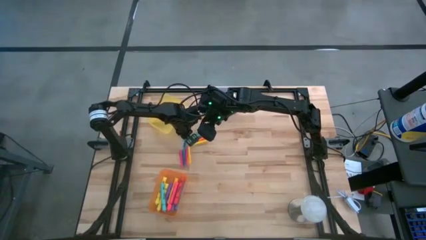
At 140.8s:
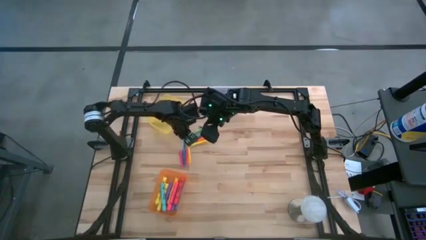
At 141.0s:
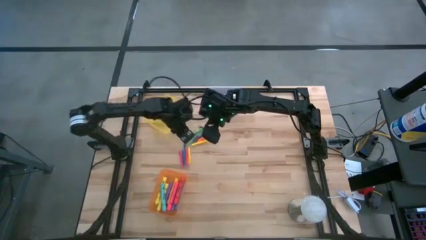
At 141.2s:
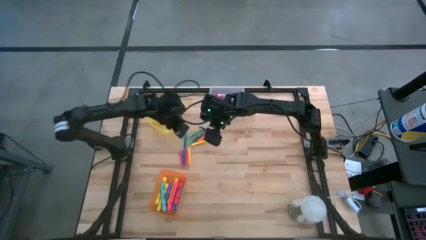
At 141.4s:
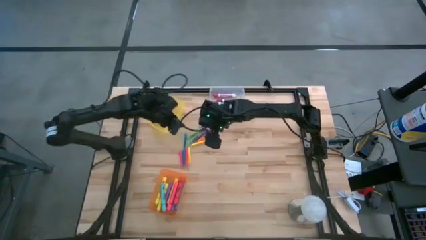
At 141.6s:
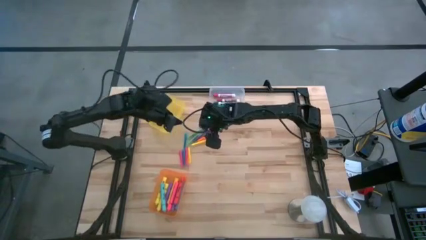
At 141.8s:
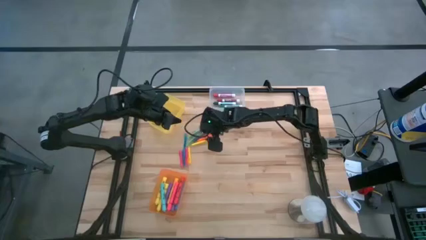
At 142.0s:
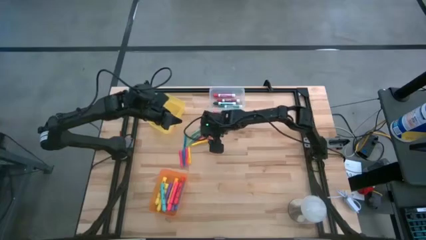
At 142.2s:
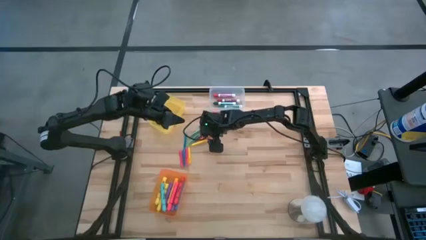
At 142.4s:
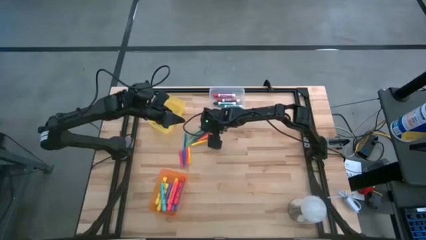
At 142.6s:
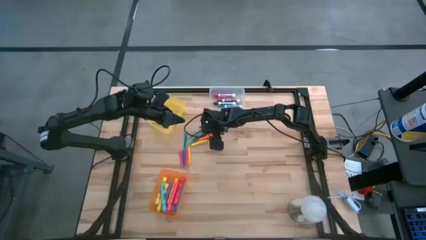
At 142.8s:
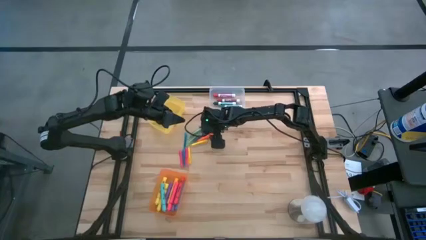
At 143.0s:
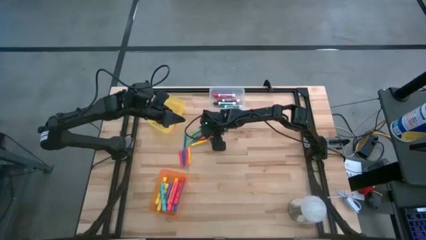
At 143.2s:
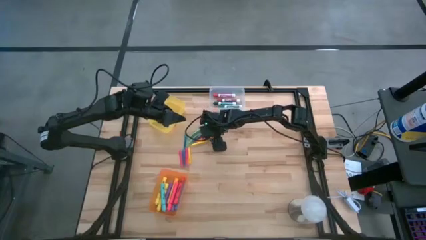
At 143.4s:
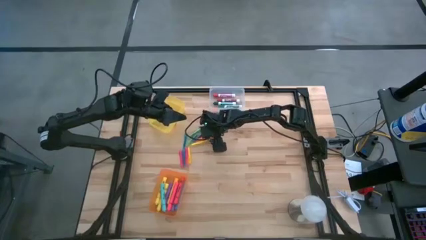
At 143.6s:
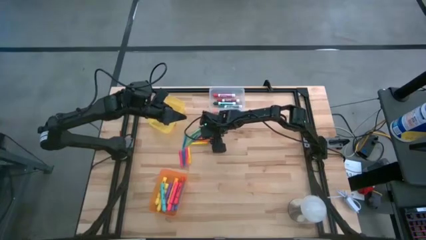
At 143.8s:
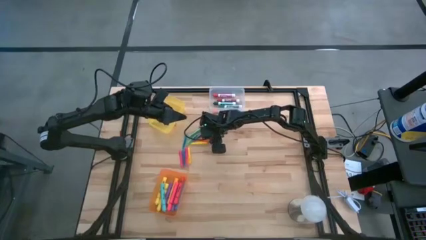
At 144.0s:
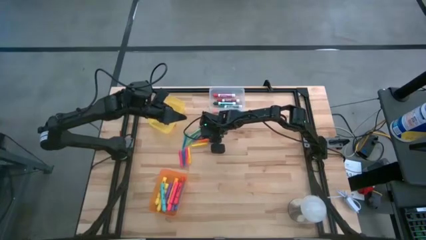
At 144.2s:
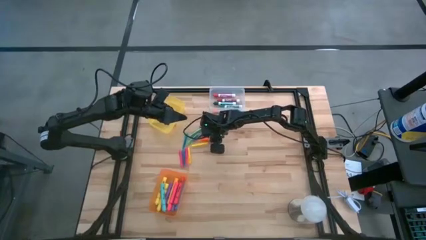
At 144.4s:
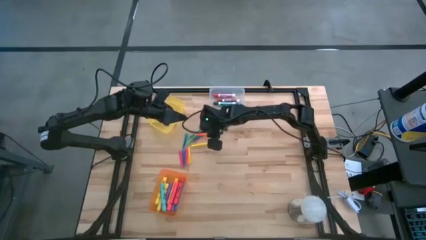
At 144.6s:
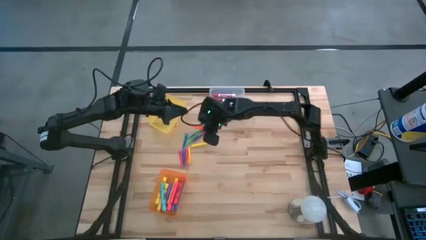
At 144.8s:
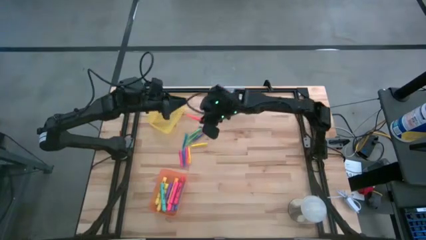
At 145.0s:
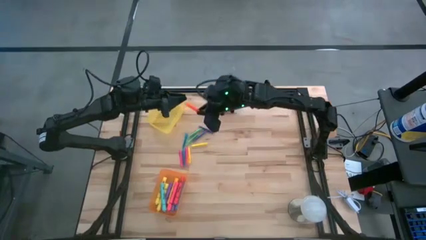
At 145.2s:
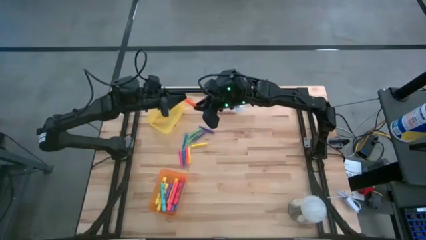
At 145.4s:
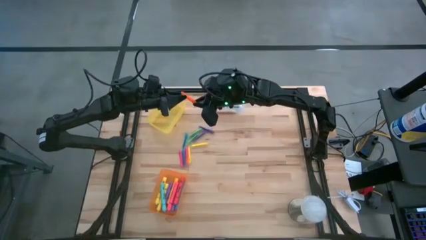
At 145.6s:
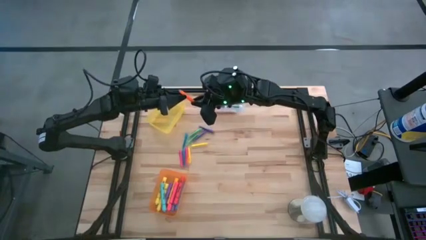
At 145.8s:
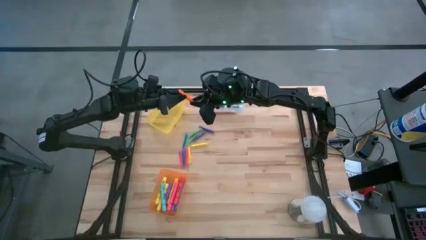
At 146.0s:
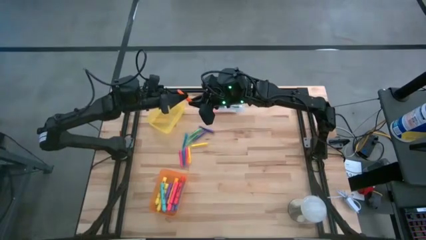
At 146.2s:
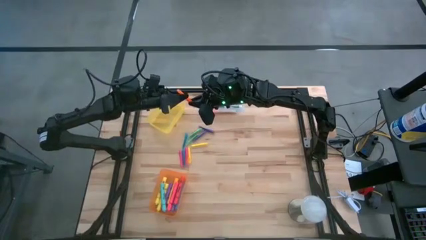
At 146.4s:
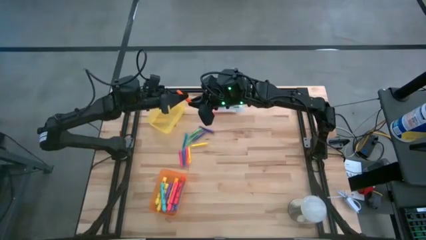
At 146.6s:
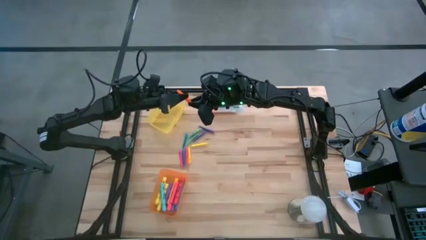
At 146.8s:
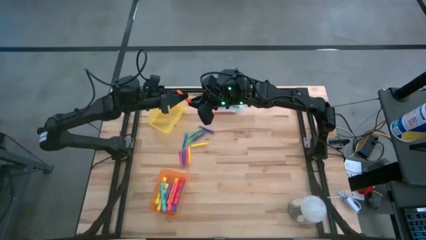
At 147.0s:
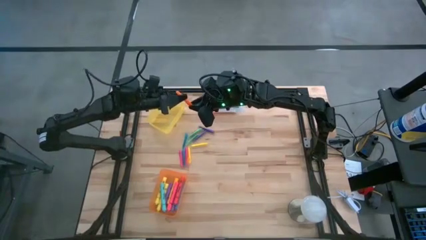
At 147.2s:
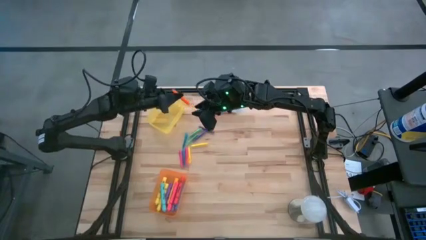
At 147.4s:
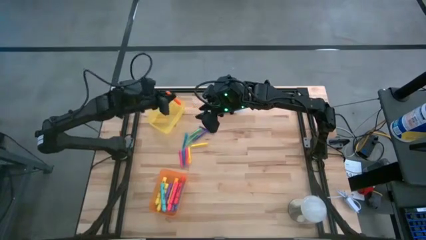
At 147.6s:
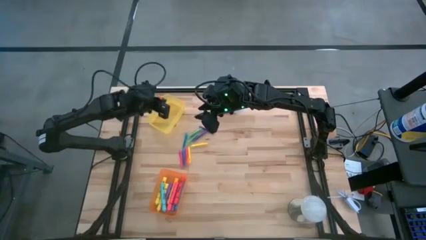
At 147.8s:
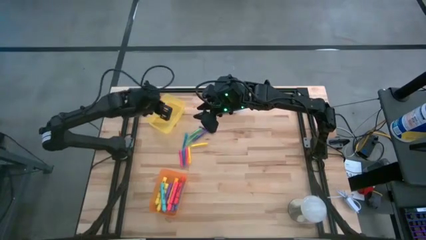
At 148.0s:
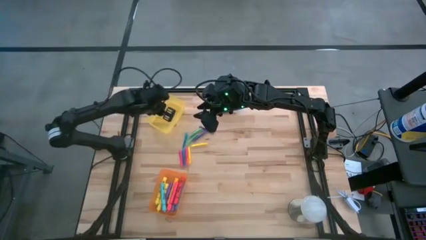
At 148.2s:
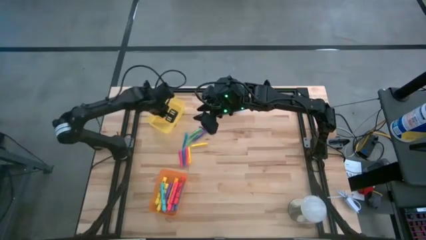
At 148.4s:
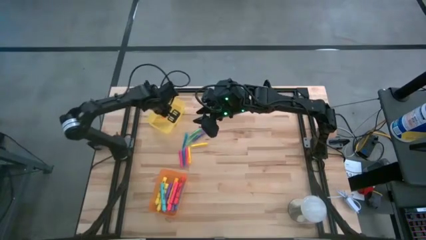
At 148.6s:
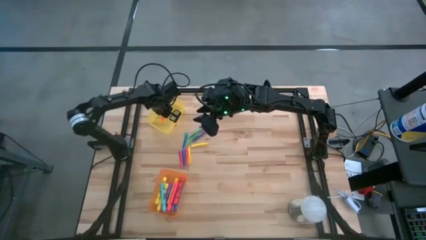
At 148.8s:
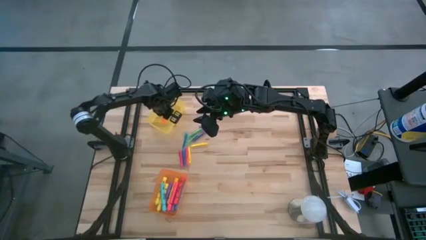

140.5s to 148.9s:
Task: Pick & Place Markers
Put the orange pen into the yellow bin

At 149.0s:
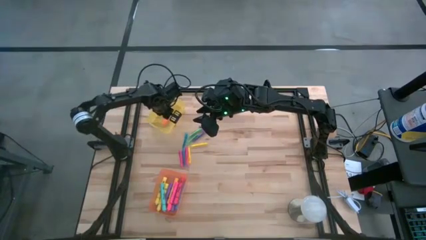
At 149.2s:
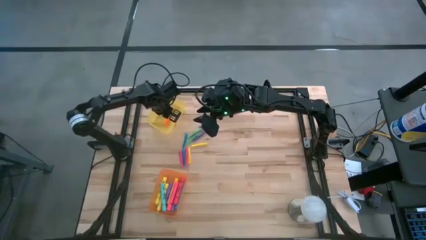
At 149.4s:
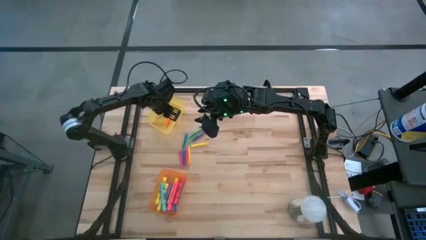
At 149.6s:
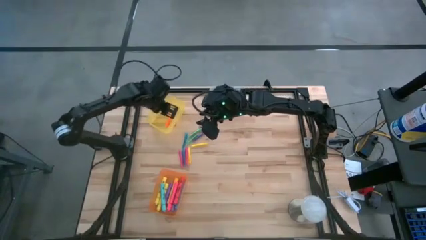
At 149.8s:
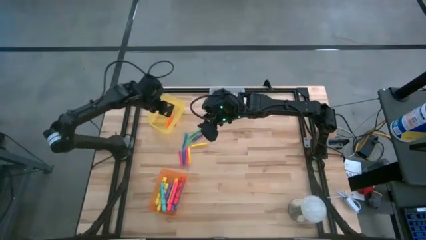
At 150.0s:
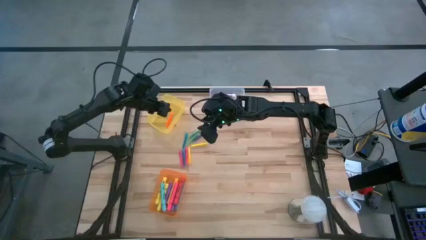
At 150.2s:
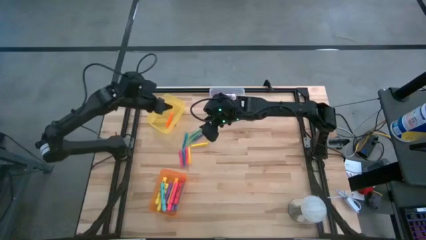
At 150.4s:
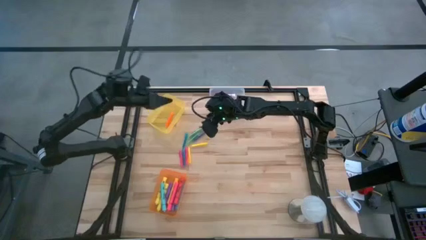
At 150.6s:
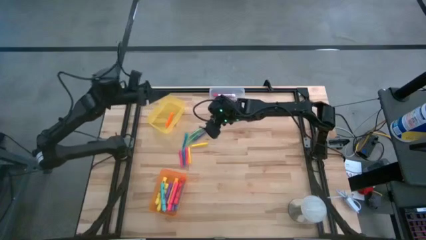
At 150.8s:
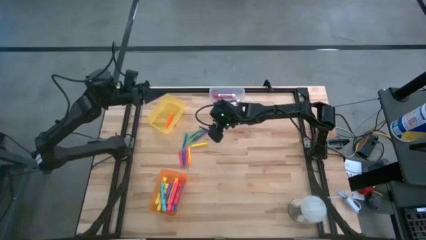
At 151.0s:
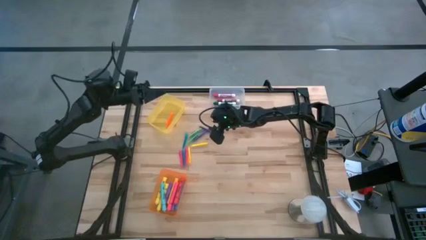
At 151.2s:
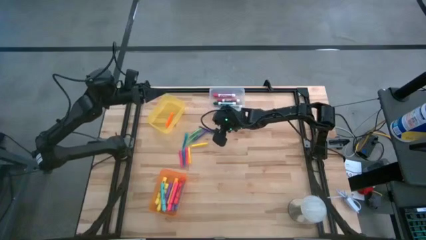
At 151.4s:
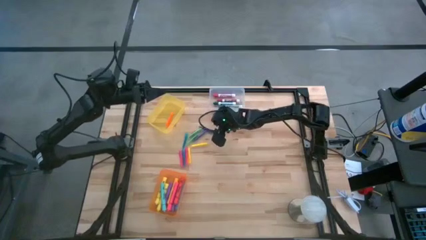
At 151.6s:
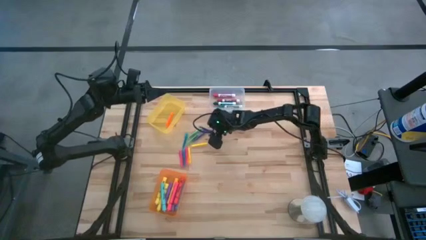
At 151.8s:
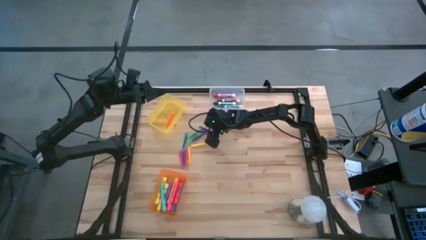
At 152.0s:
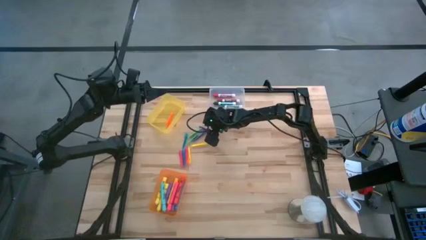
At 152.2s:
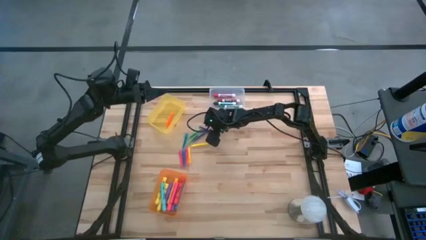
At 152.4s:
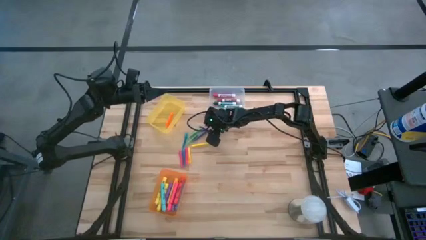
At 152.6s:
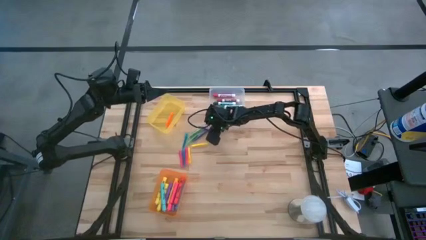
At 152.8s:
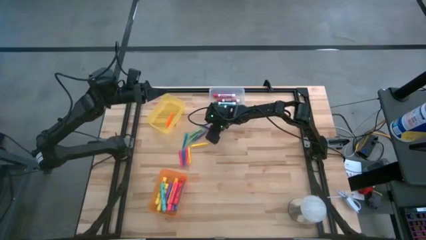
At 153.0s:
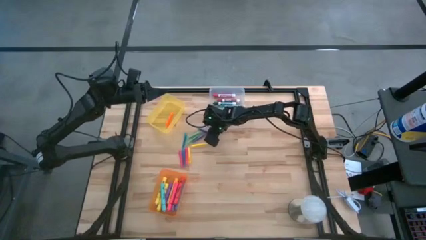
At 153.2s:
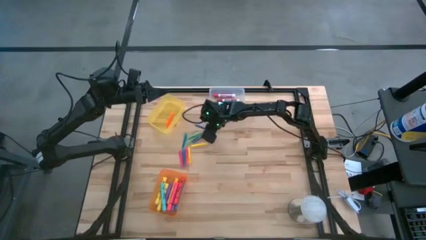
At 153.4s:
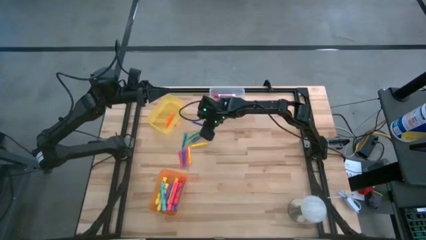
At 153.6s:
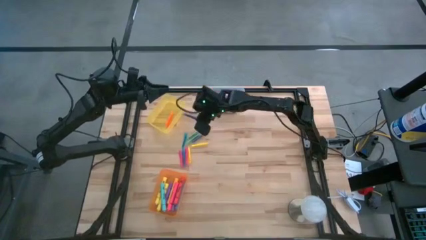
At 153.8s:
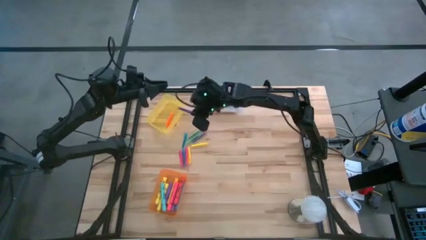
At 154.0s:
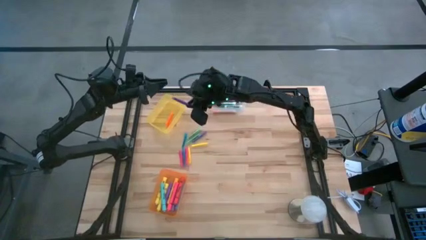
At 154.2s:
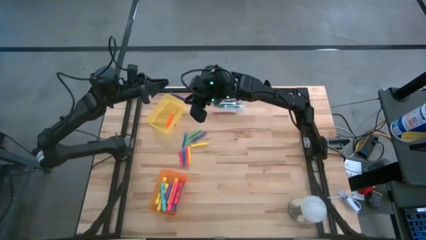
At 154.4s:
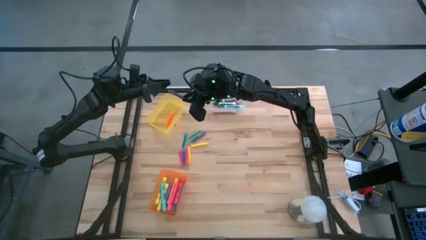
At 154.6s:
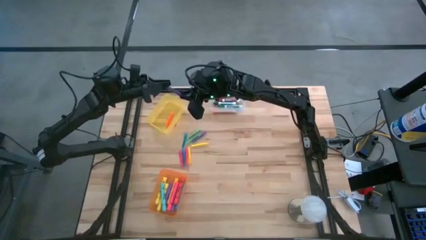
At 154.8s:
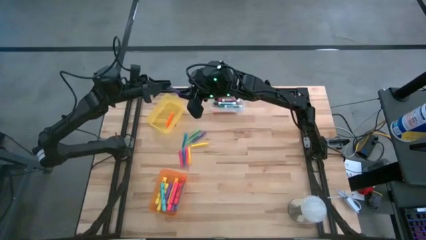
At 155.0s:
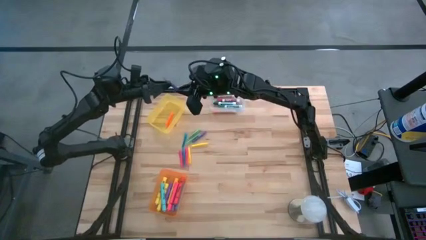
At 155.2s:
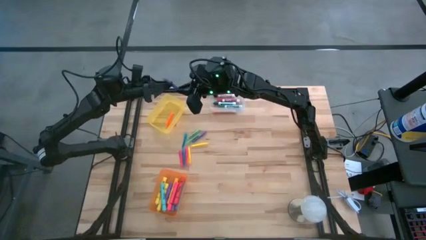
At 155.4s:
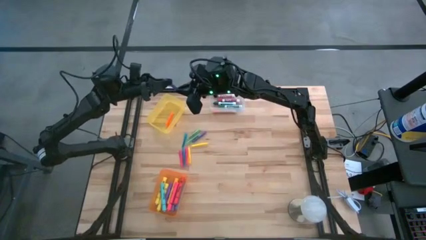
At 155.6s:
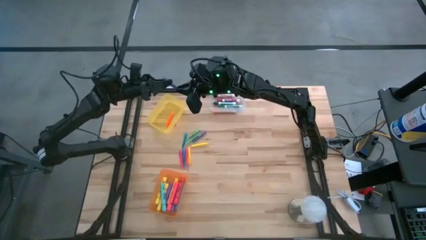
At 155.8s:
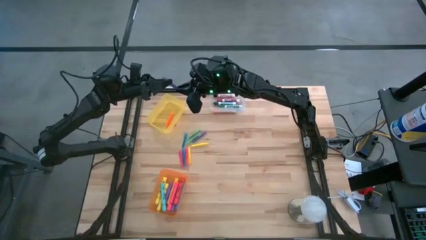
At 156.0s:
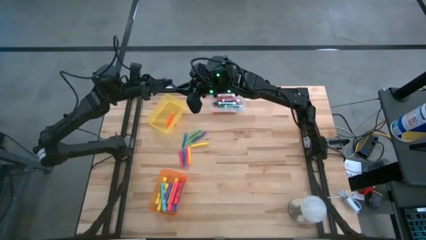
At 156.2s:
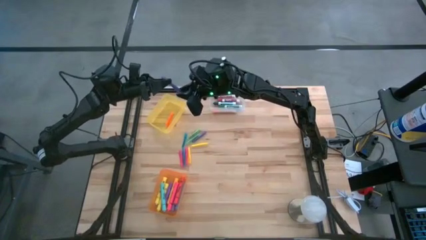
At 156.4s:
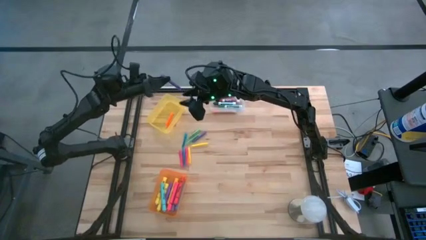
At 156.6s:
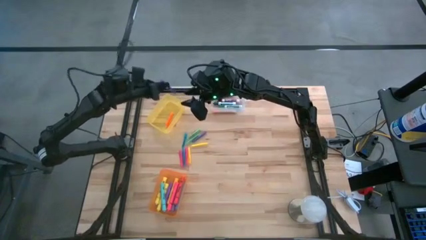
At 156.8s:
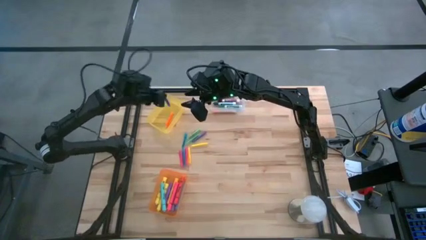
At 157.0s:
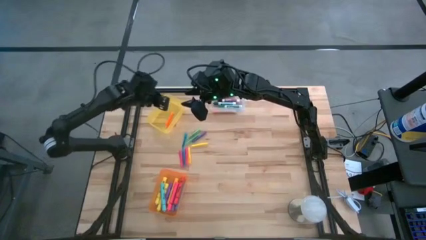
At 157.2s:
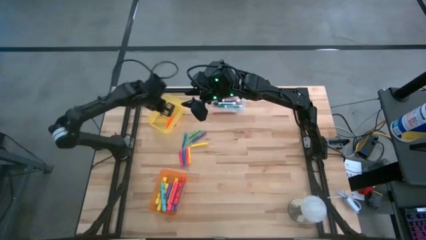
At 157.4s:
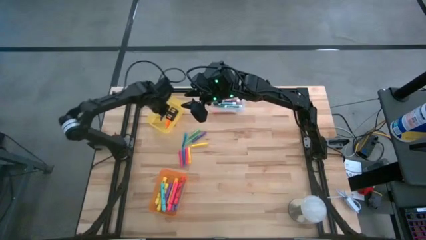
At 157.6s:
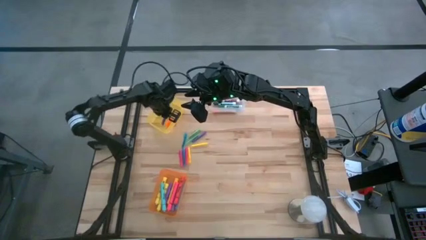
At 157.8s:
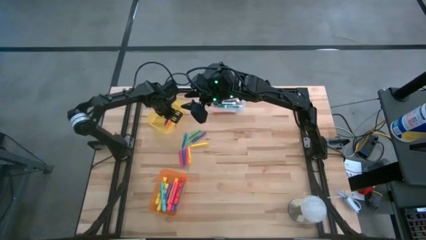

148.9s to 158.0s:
Put the top purple pen into the yellow bin
